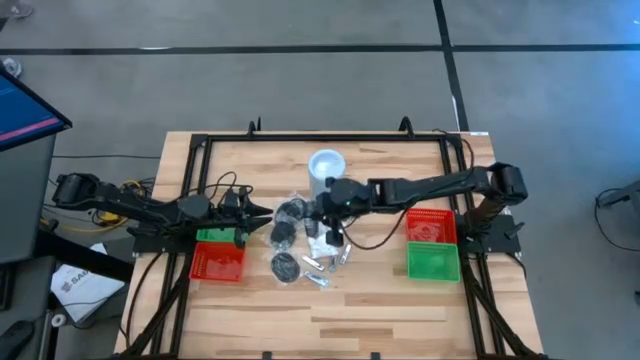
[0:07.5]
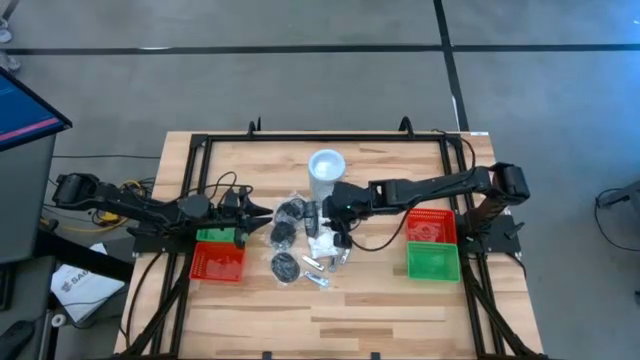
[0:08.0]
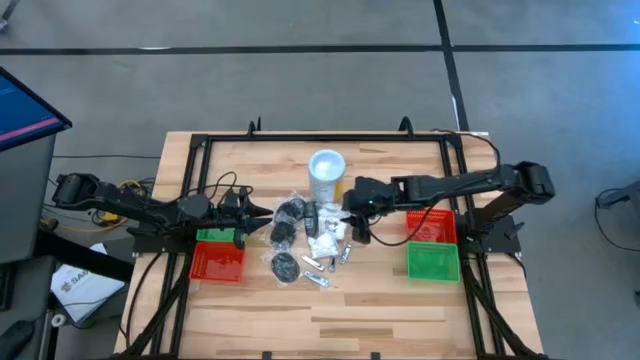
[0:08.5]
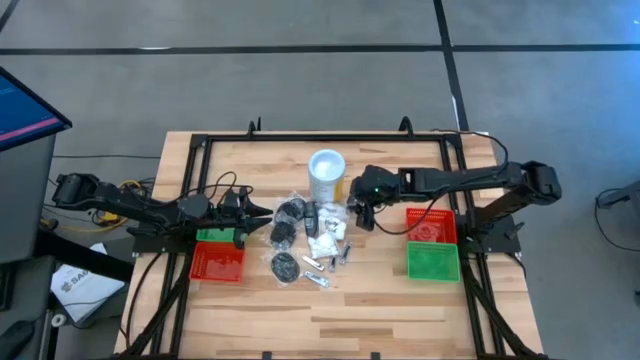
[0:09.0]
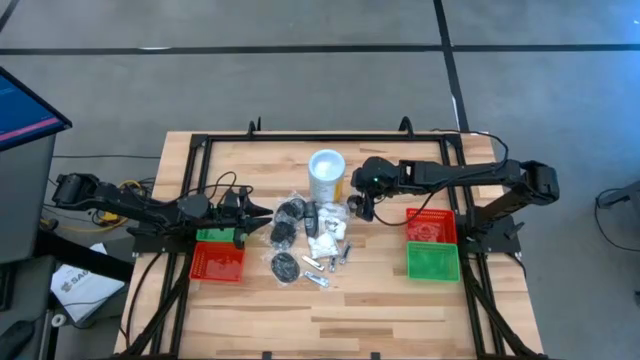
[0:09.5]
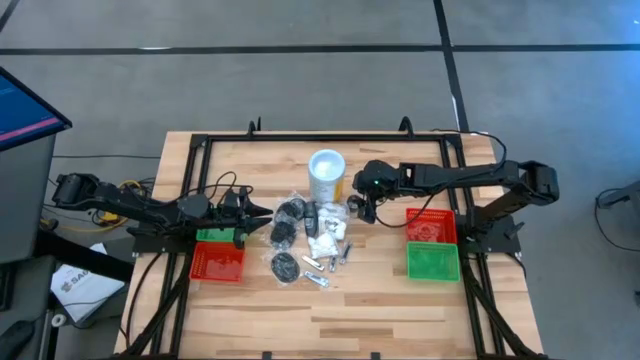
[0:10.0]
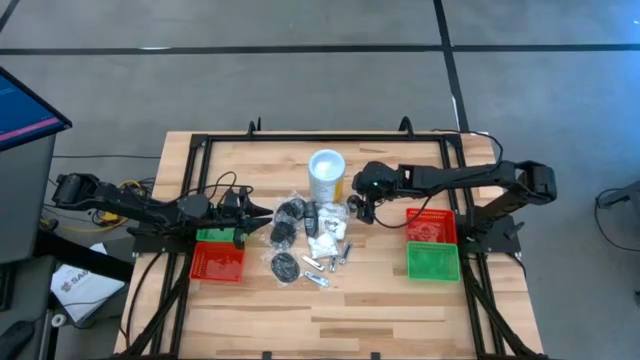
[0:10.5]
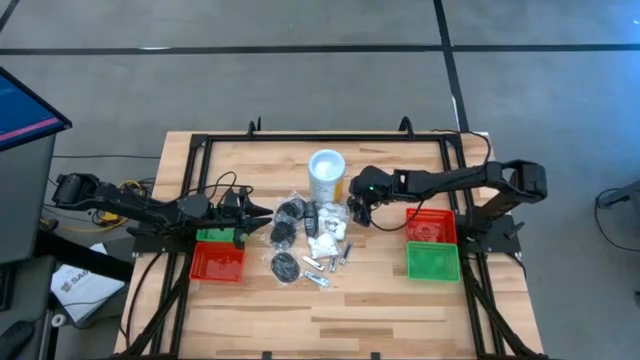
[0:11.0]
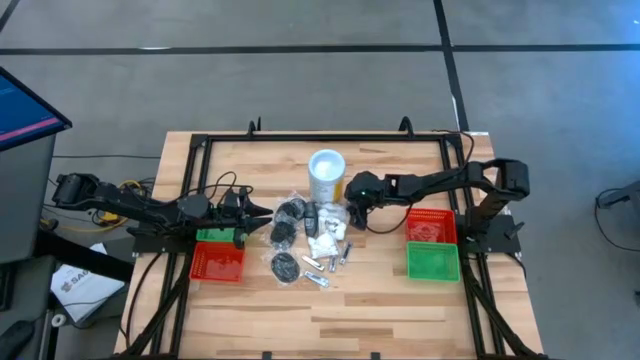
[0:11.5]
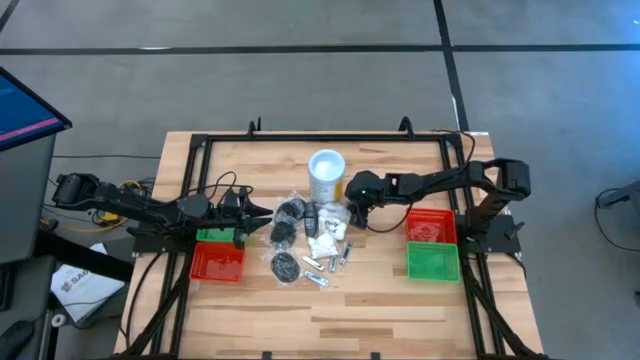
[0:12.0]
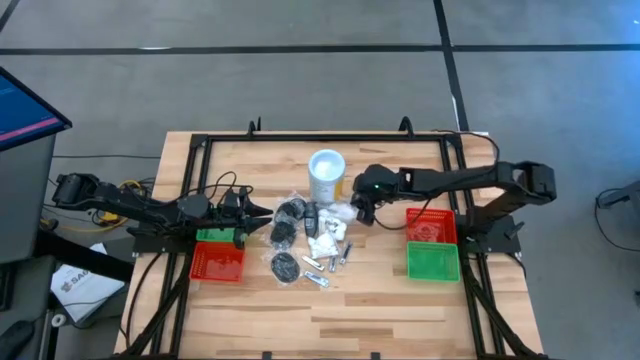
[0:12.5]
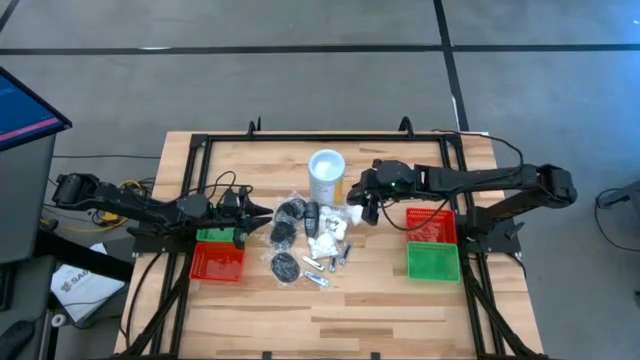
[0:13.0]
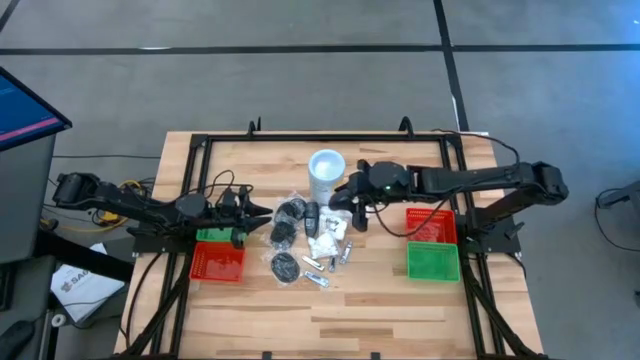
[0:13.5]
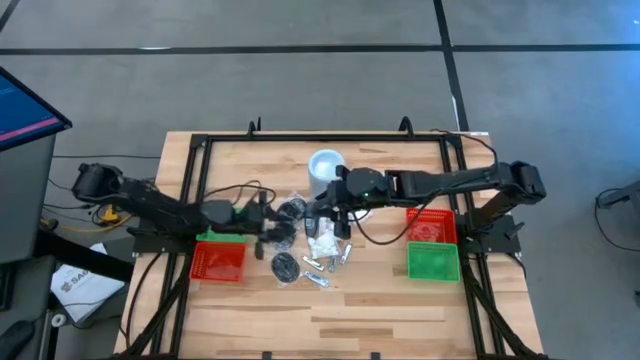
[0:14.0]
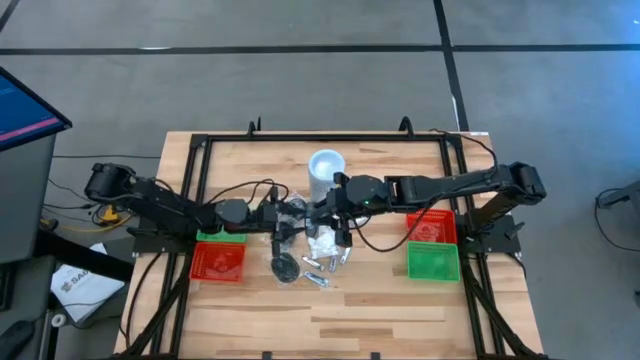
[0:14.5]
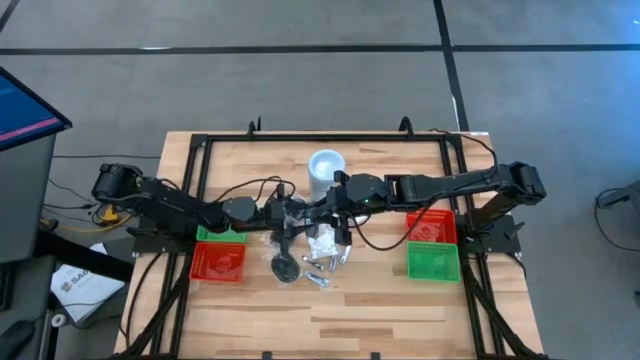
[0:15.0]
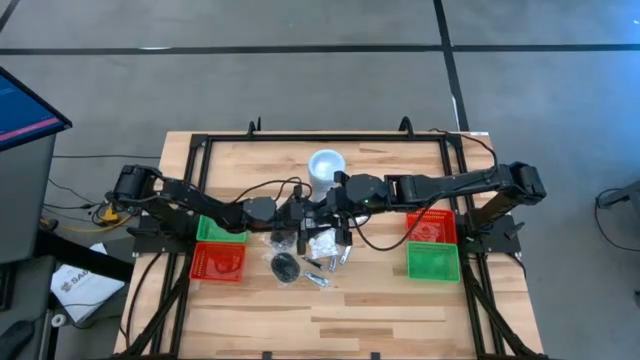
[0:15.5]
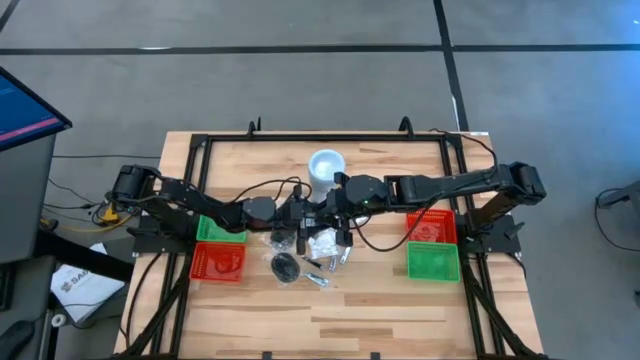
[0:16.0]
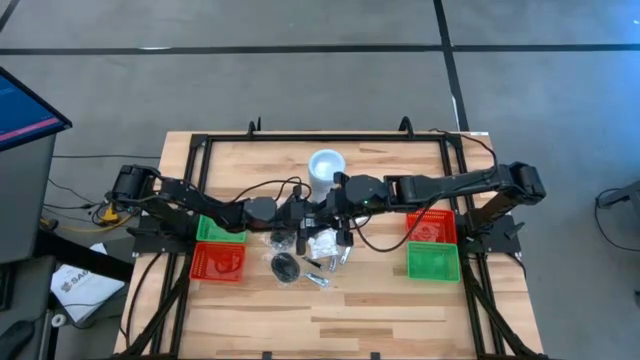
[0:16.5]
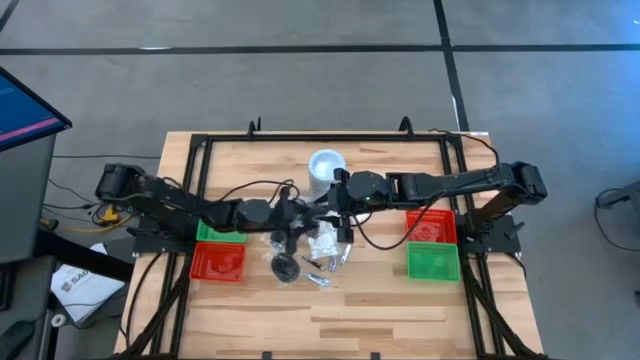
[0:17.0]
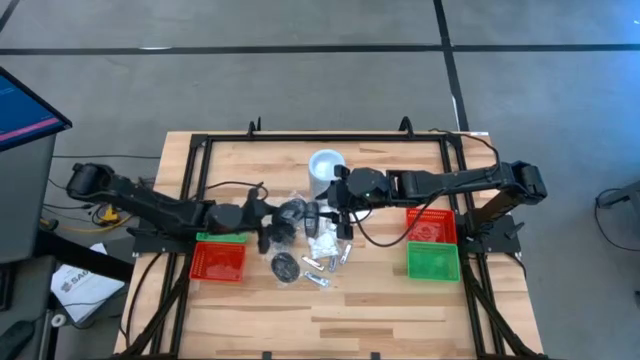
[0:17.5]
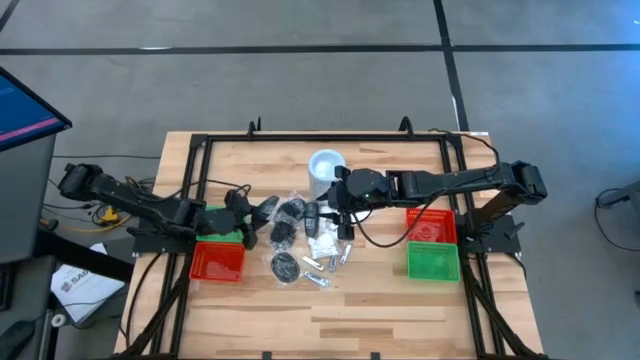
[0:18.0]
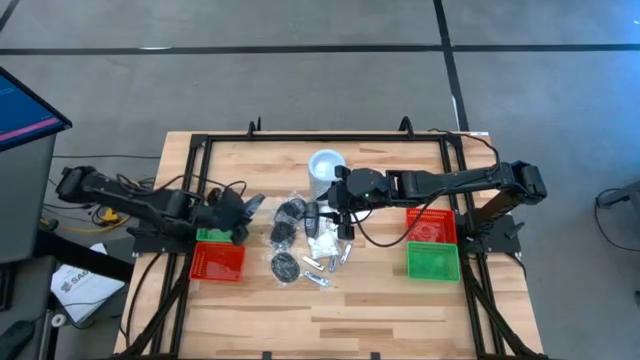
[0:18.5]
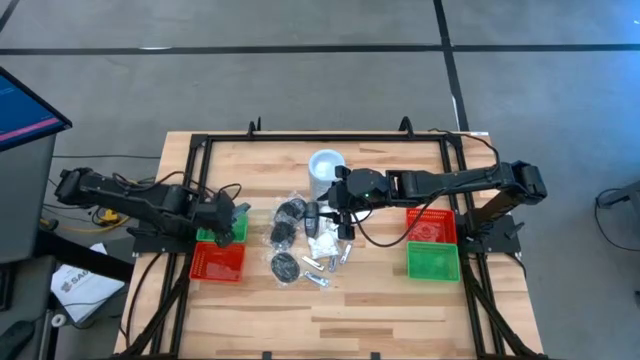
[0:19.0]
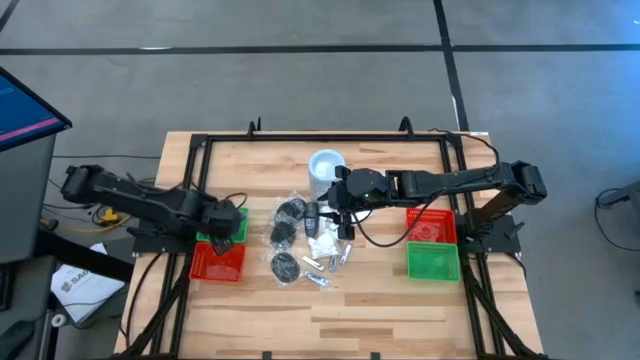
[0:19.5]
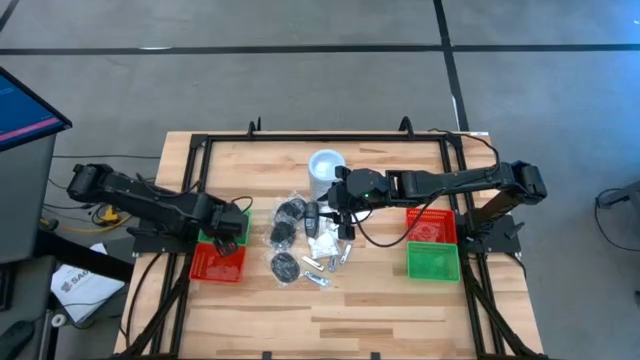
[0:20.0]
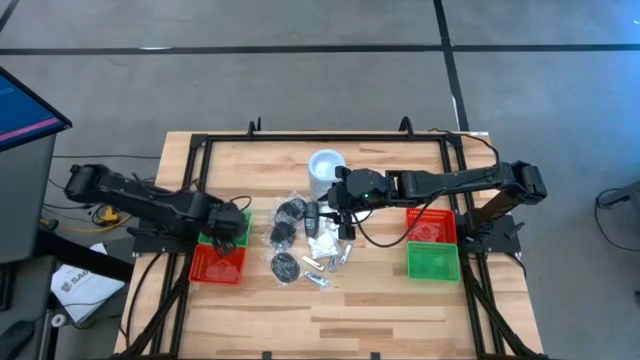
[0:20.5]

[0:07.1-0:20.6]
Task: Pick & Place Travel size toiletries
Put the gray deodorant into the left green bin

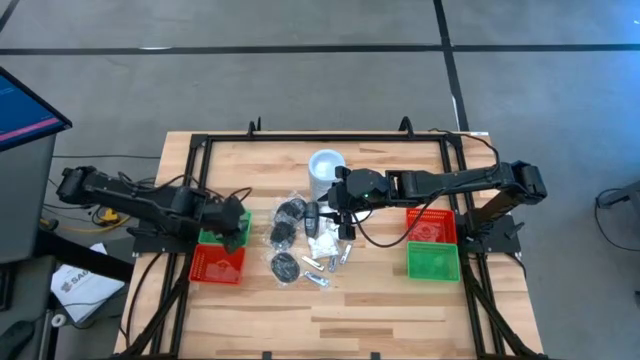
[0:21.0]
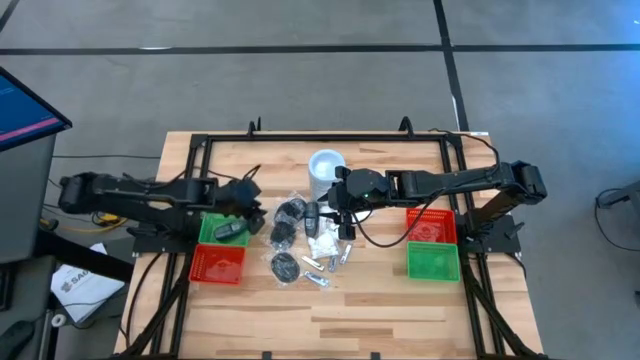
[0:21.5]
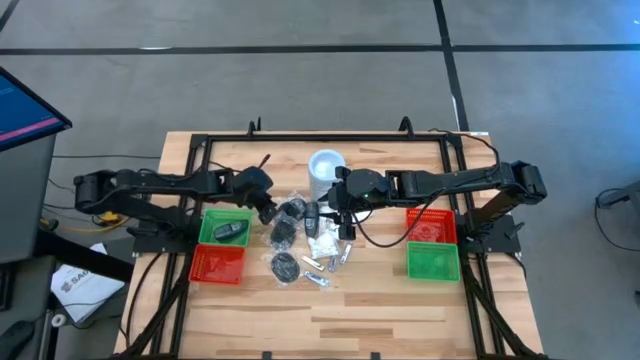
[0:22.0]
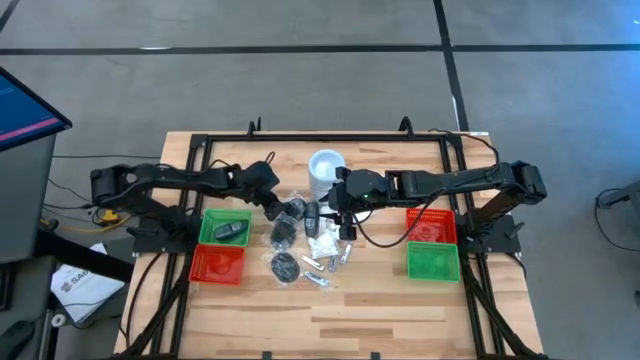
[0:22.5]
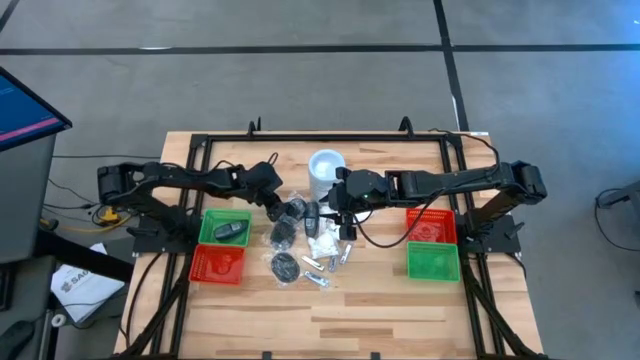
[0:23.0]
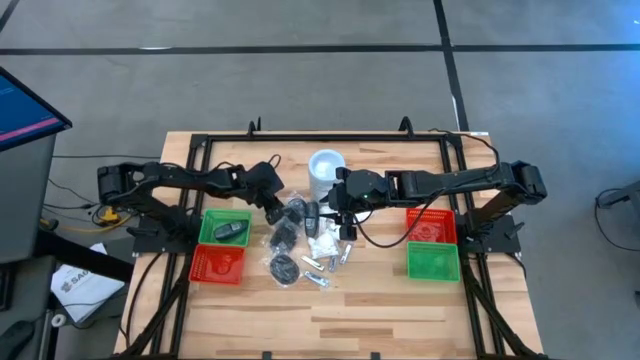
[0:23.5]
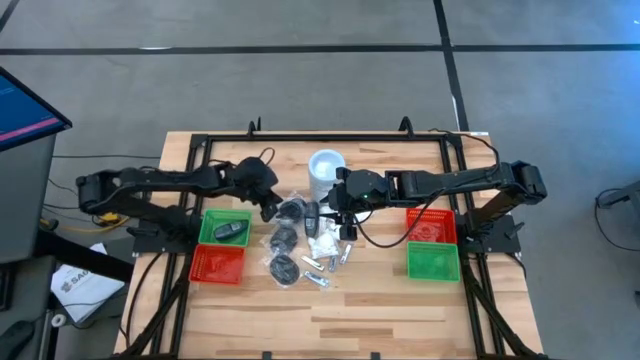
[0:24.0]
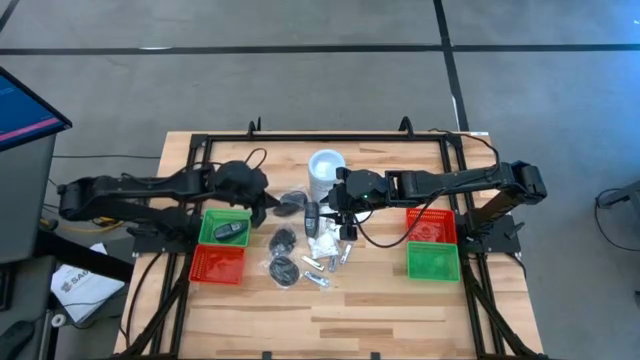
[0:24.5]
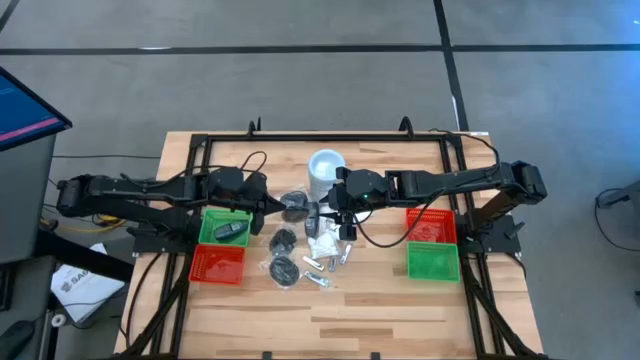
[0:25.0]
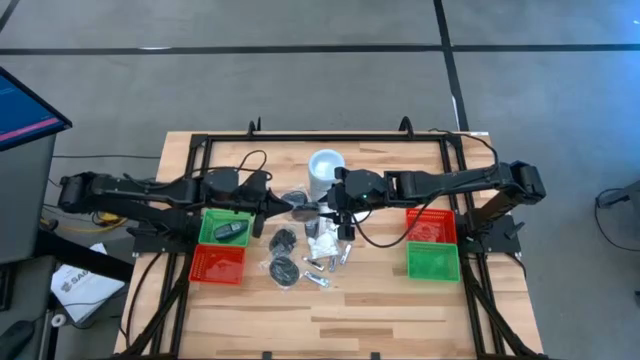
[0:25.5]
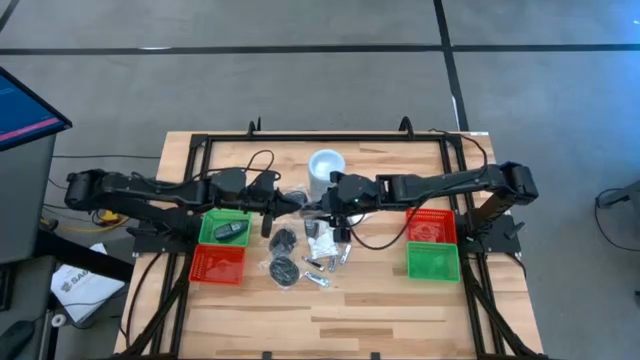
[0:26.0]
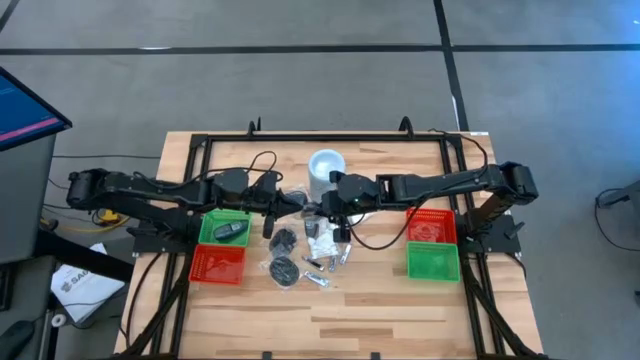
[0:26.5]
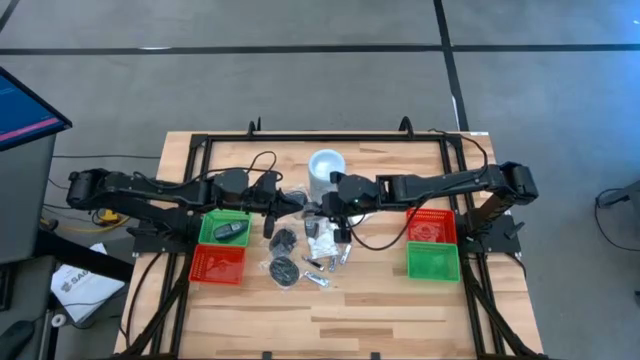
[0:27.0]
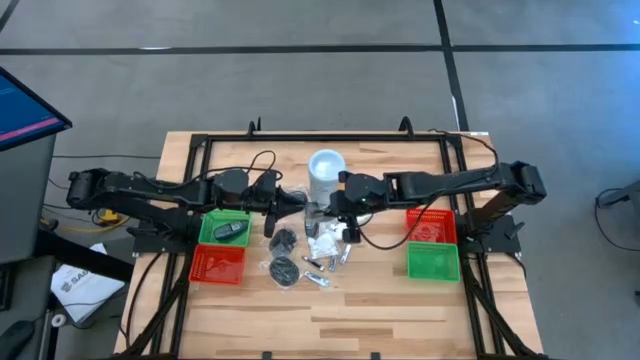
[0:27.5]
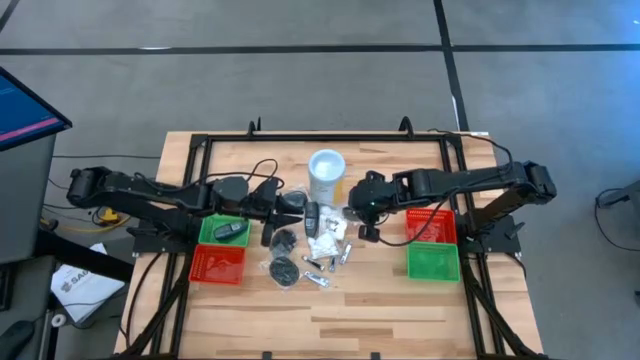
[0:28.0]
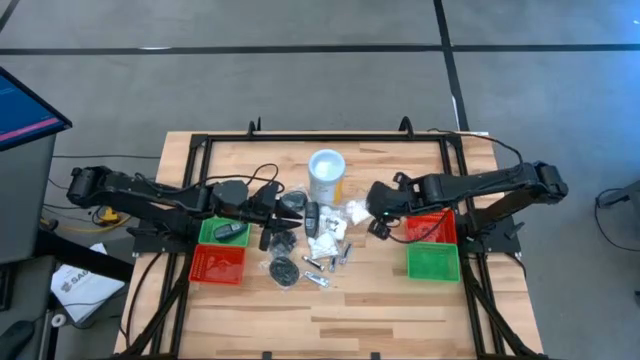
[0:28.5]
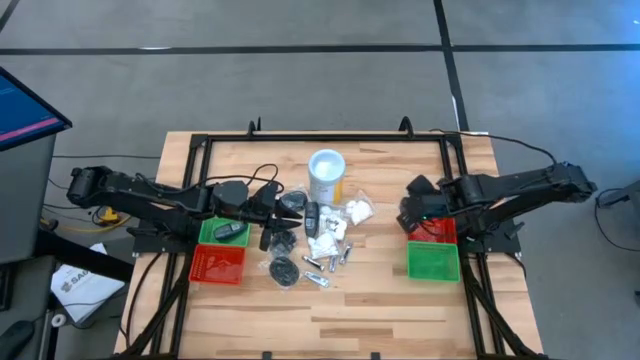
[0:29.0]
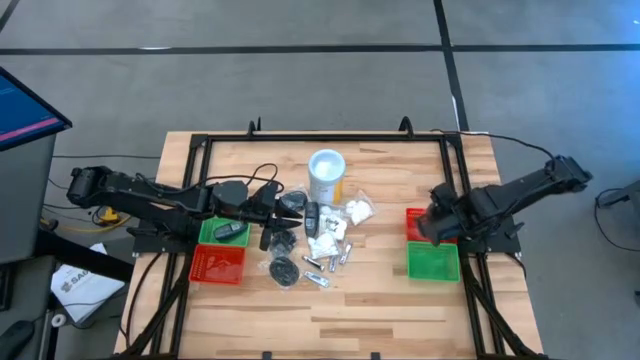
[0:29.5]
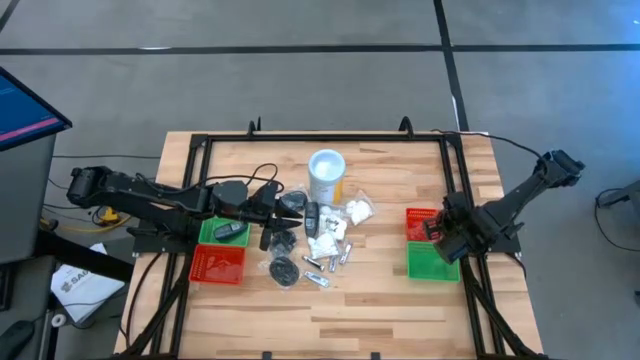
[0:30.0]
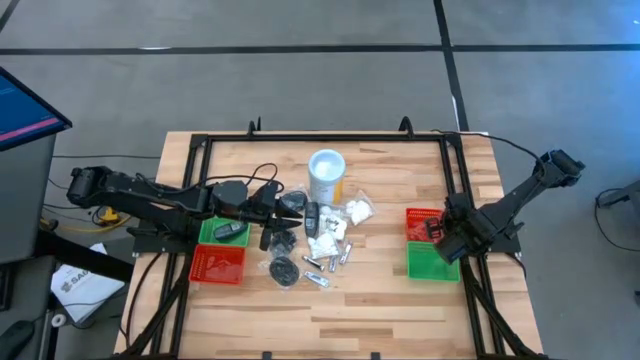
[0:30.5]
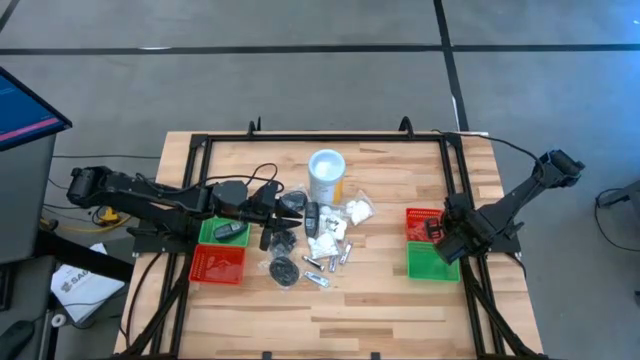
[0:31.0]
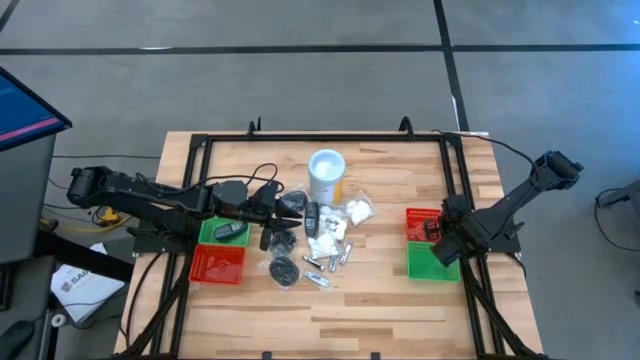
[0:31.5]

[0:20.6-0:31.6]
Put the hairbrush into the right red bin
